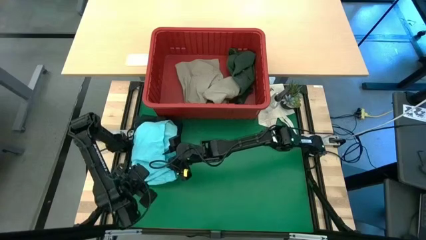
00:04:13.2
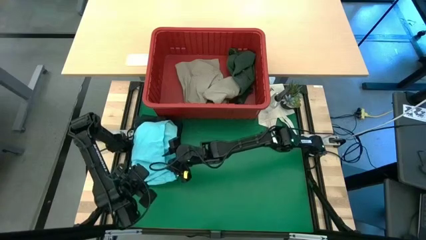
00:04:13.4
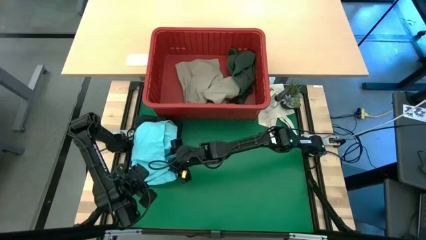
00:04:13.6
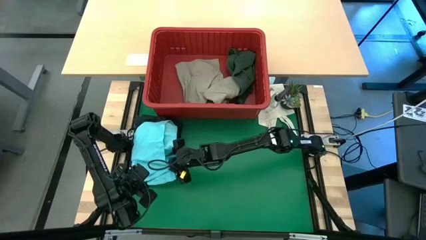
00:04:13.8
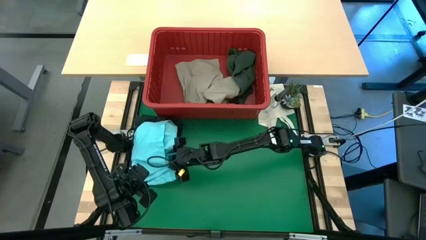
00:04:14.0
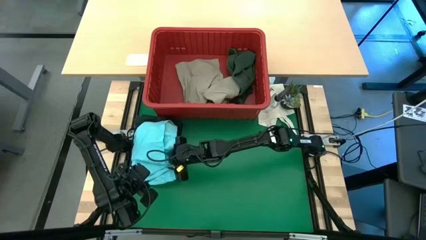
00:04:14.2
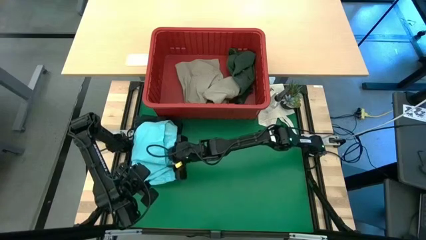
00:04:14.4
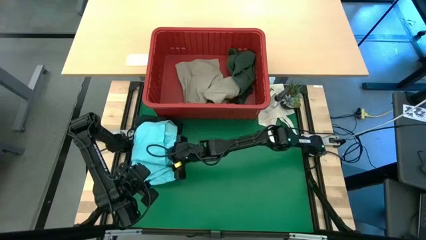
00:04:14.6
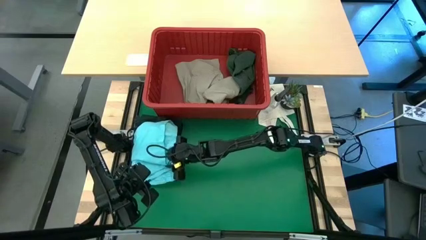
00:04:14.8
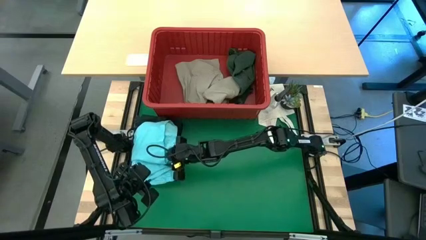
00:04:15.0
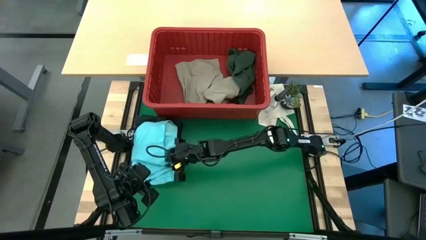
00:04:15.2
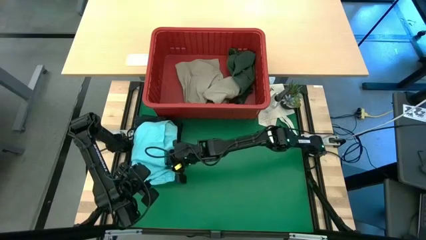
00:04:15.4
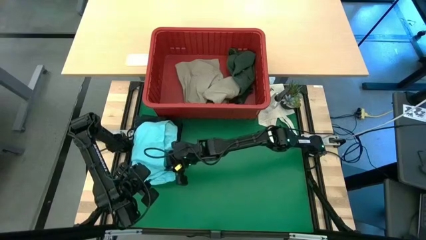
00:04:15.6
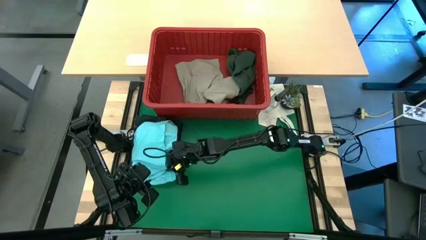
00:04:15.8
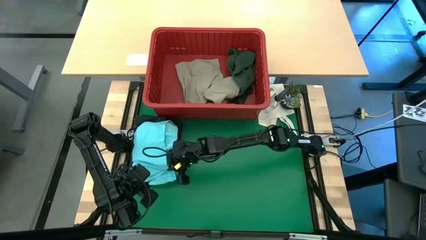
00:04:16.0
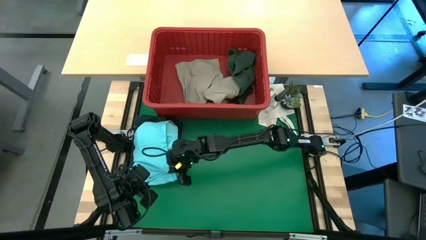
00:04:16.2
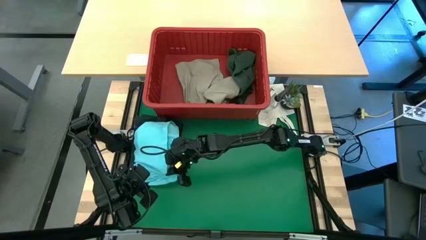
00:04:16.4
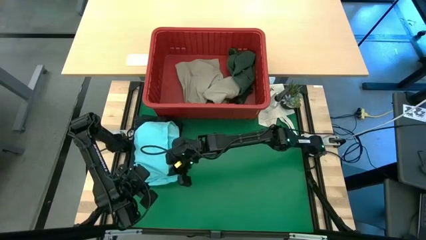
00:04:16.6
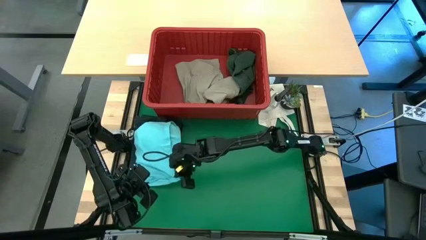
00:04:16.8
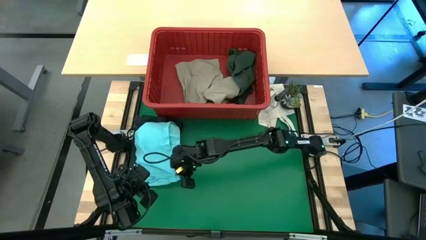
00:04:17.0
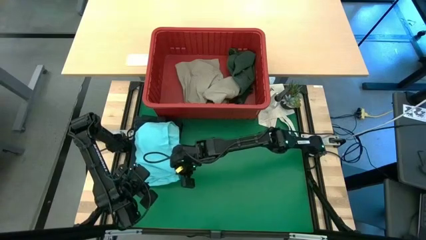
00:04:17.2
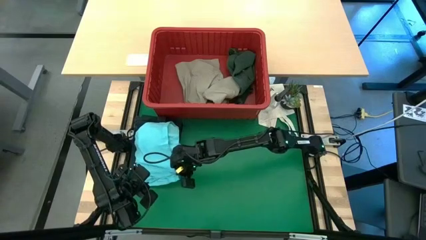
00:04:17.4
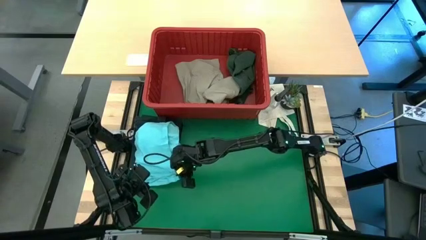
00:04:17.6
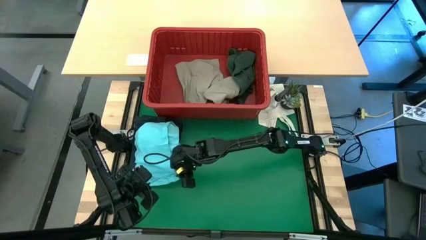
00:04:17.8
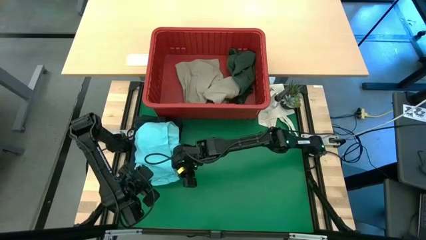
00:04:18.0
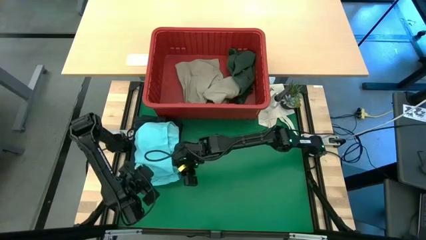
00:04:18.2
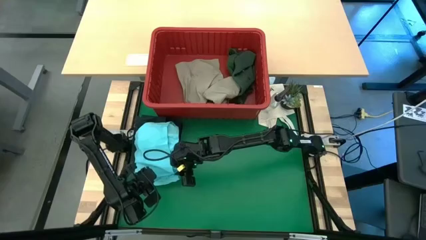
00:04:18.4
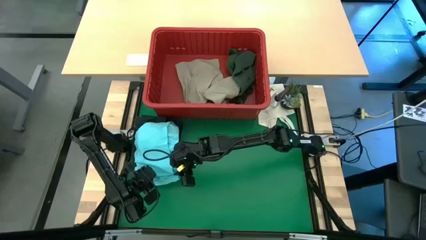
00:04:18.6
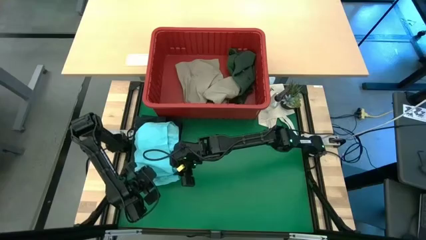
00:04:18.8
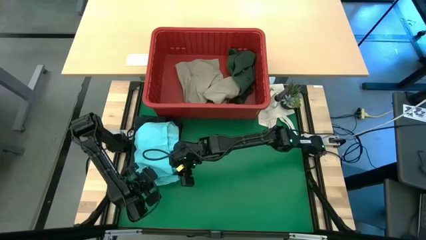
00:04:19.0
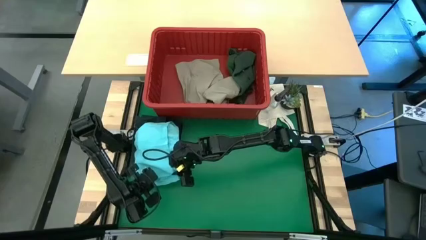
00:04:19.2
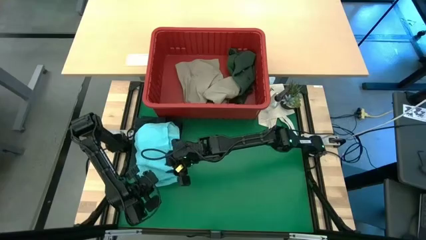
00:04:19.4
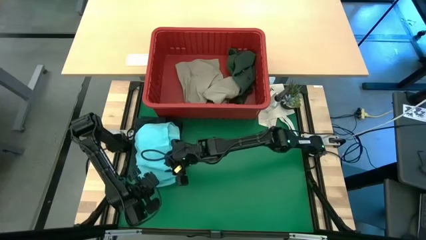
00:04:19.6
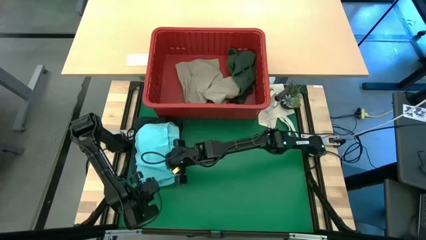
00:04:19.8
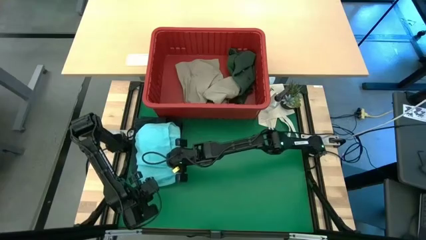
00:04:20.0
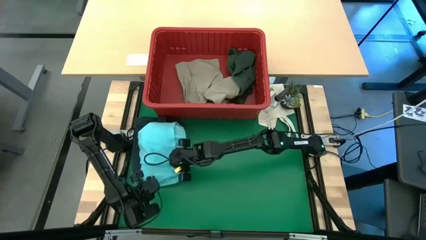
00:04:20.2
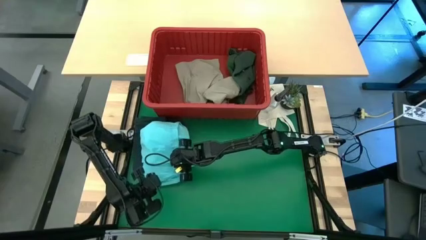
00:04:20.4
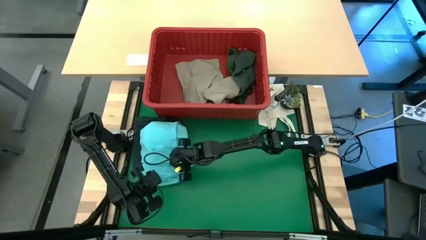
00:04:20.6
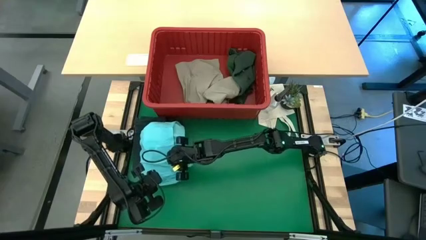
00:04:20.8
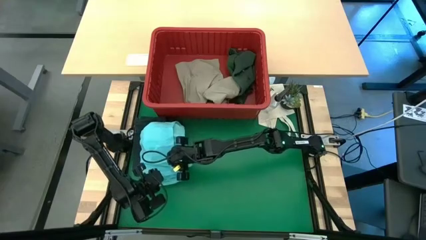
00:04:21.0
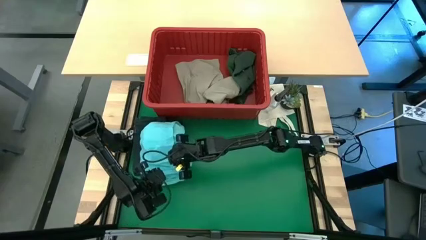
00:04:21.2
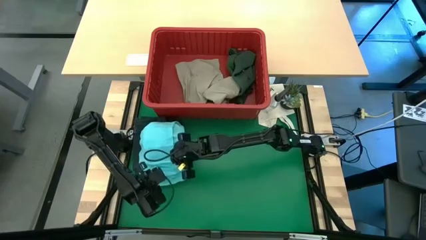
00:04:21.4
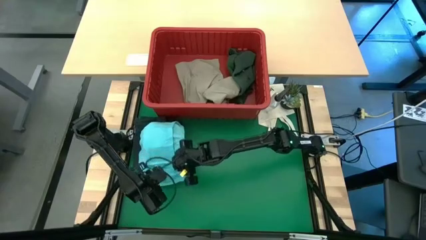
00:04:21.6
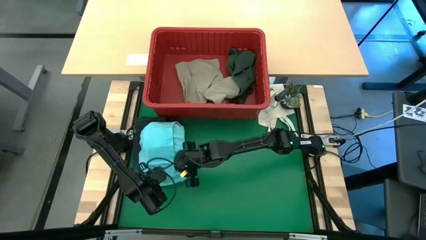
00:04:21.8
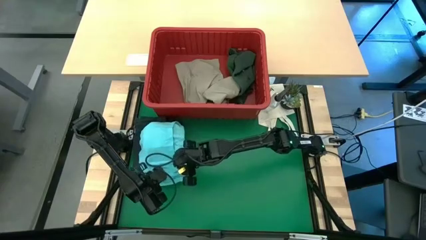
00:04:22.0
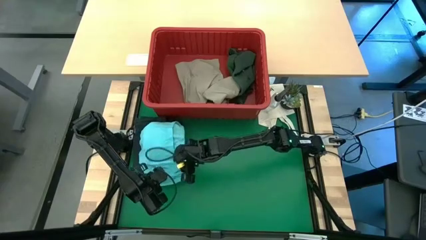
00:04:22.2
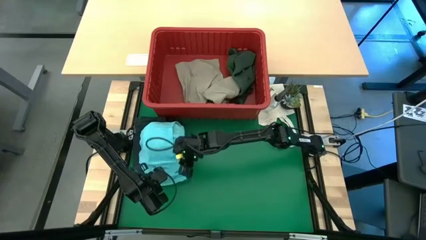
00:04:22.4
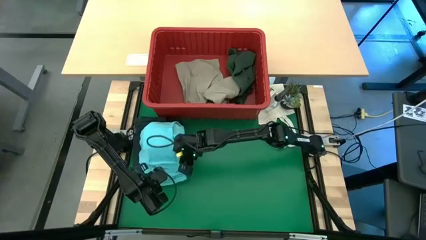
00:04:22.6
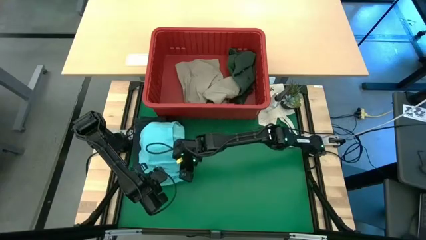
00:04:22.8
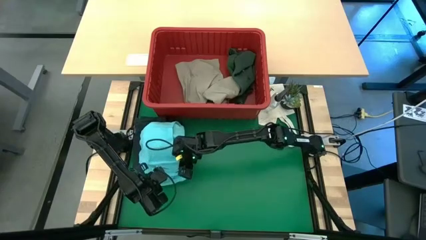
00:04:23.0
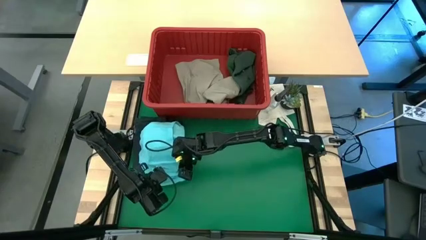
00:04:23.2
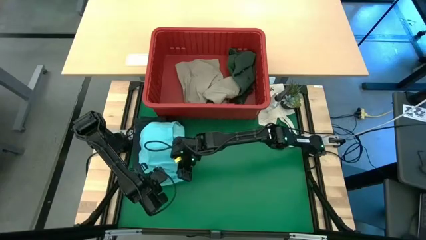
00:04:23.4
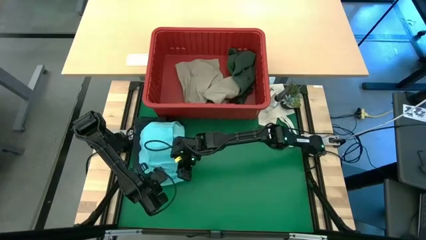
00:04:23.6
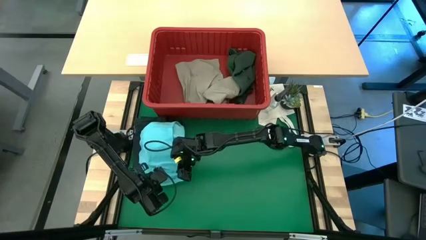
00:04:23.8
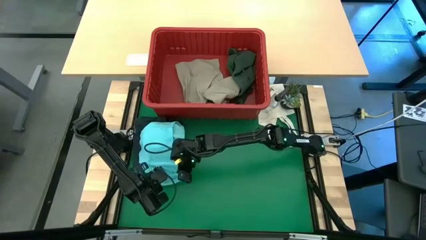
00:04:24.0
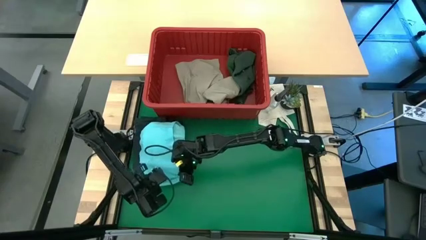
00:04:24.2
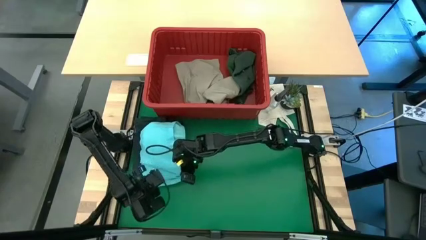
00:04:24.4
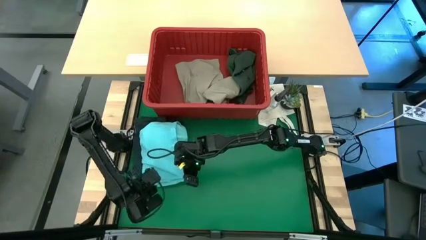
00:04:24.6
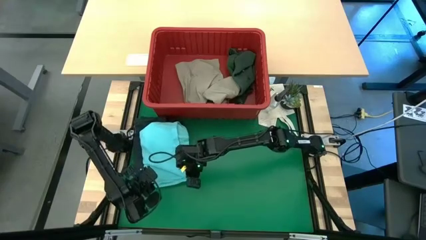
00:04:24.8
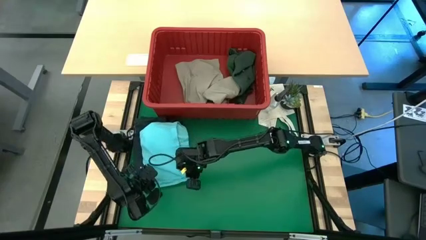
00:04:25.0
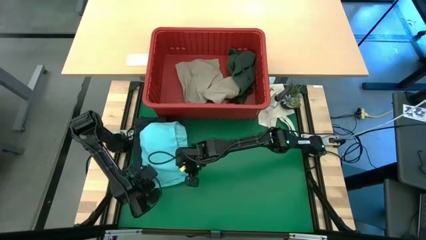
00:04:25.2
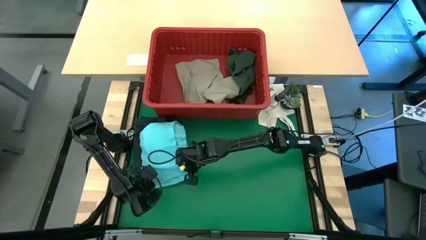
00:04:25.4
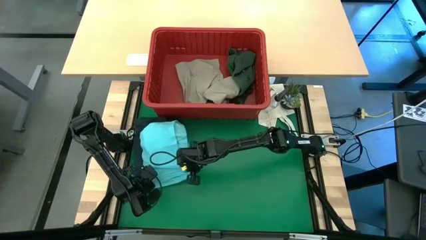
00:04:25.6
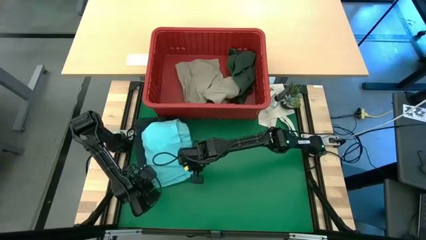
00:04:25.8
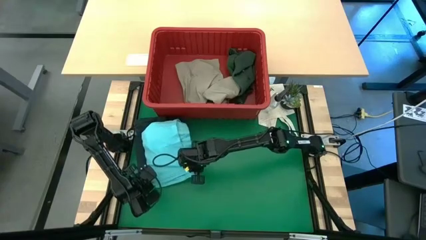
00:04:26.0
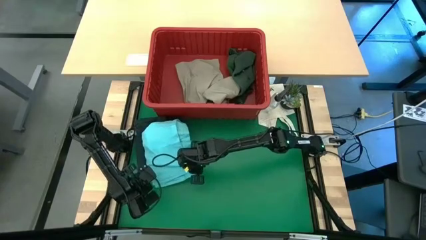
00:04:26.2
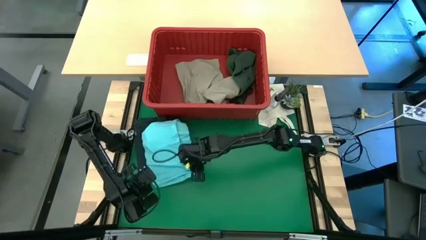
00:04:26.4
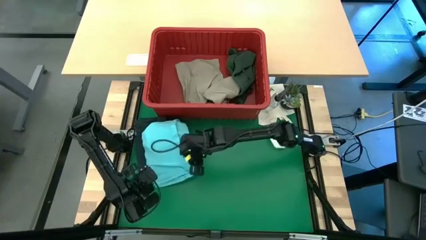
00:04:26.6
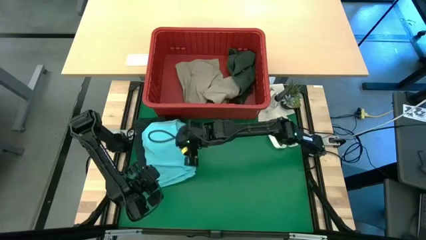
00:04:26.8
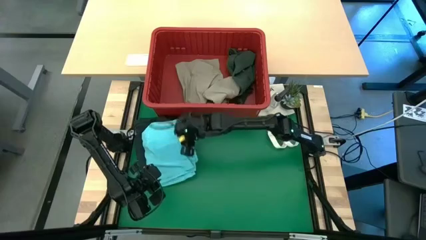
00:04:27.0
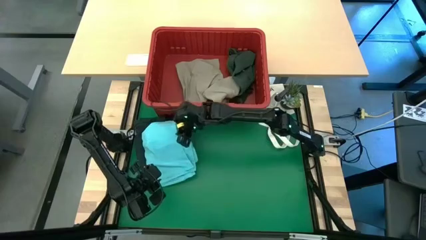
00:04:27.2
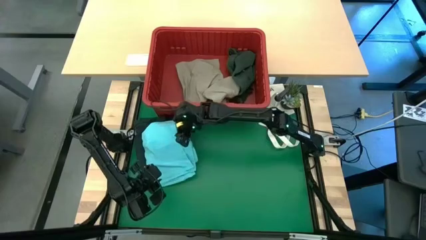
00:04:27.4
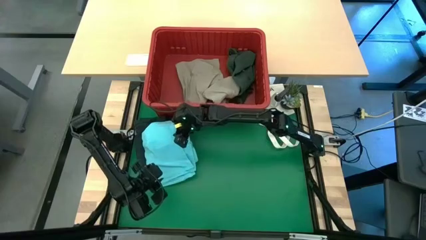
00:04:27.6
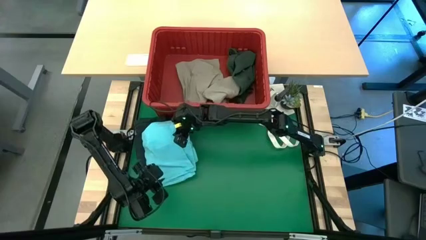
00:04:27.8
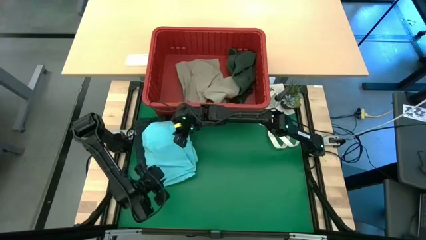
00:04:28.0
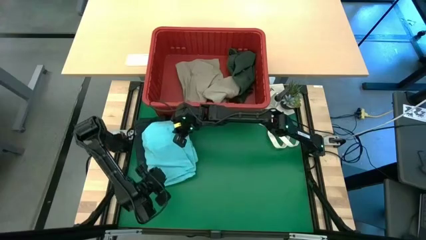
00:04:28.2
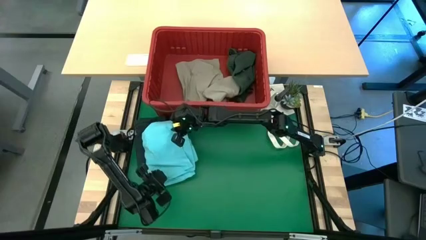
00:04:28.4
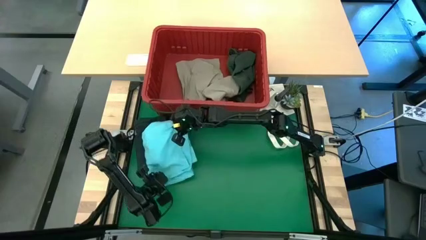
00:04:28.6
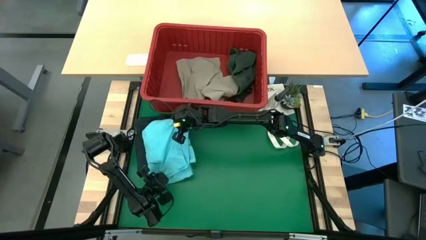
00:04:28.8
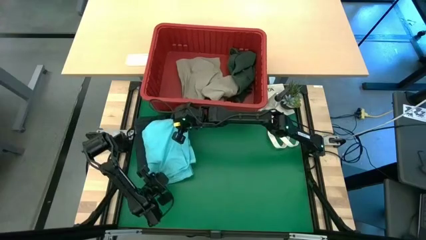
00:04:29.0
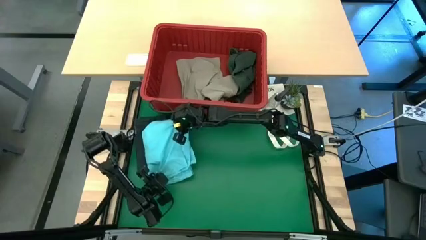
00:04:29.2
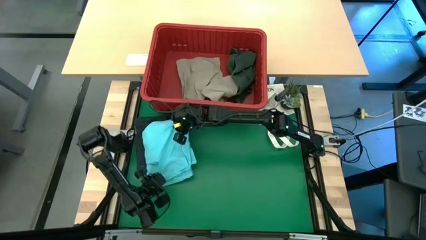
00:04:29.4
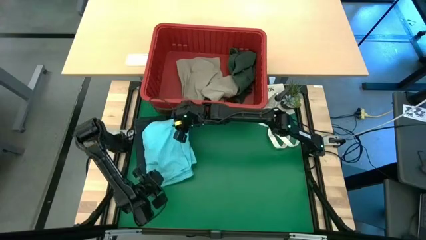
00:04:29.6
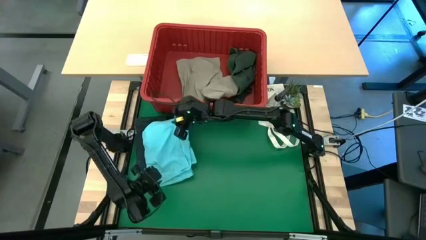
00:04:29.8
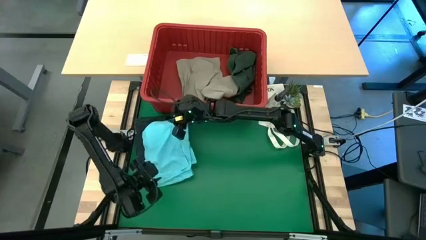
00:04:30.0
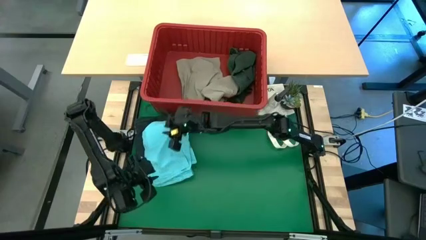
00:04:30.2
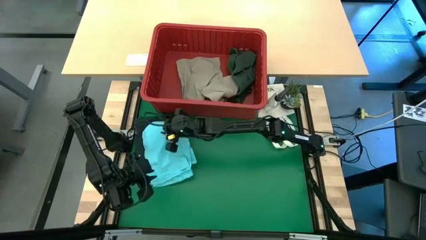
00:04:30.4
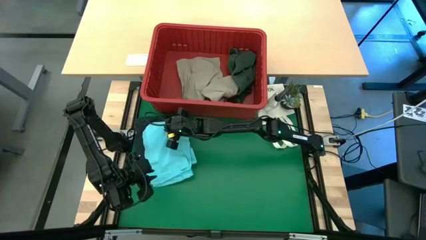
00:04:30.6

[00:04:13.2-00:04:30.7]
Task: Fold Laundry from Bin
Stack the folded blue shorts on top of the folded black shorts
